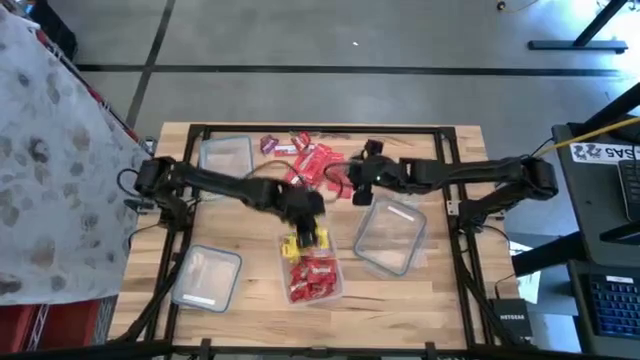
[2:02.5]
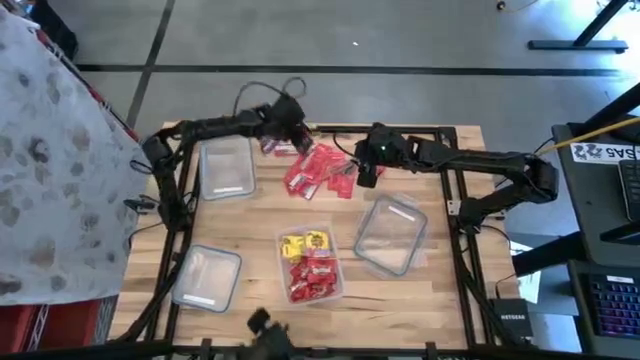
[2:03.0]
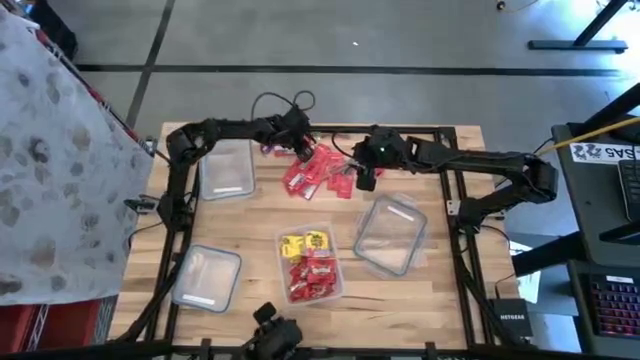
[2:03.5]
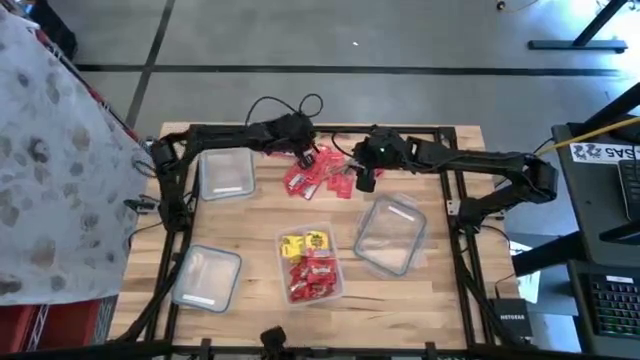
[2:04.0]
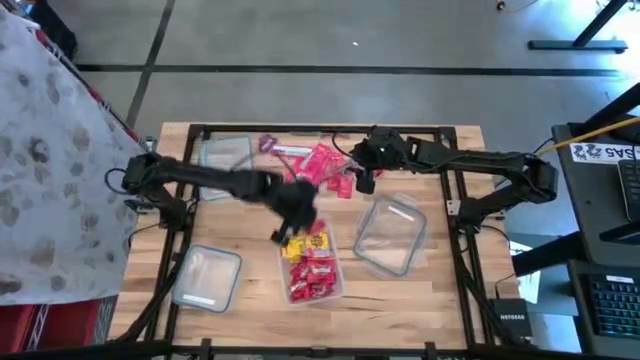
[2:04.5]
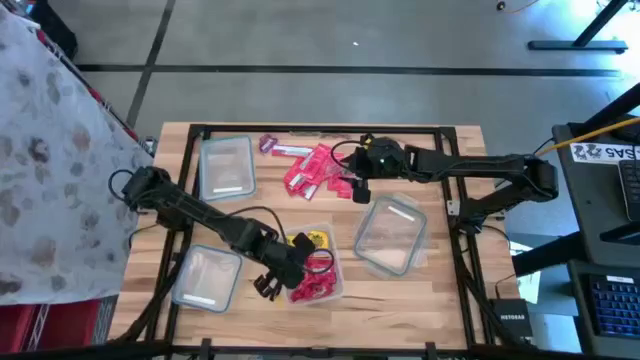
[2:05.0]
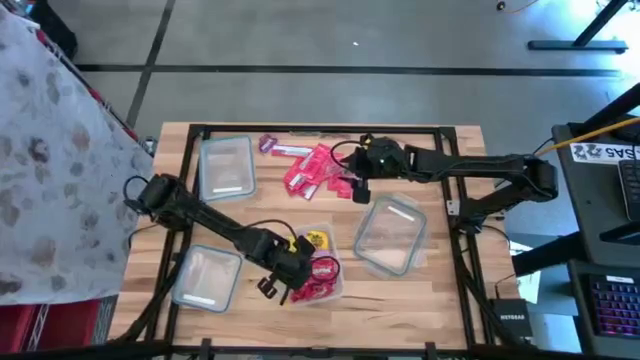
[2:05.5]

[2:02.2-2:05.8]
Task: Sort candy
Put the red candy into the right transparent bin

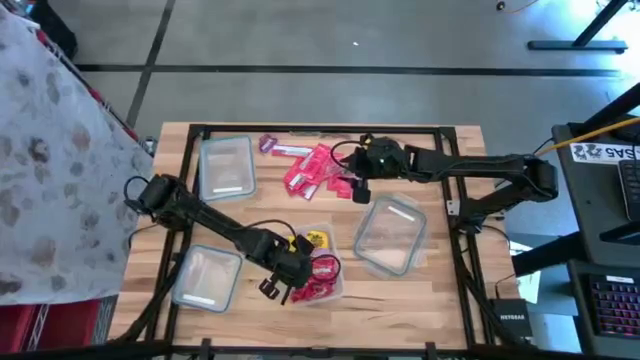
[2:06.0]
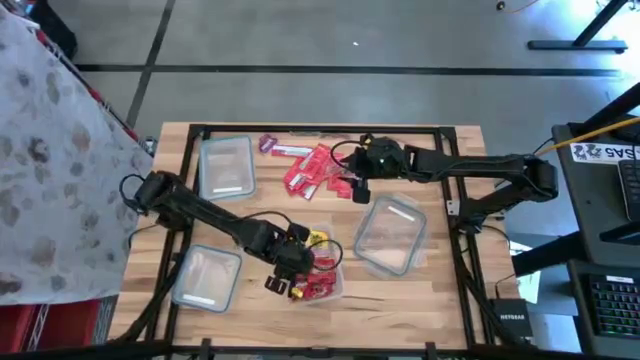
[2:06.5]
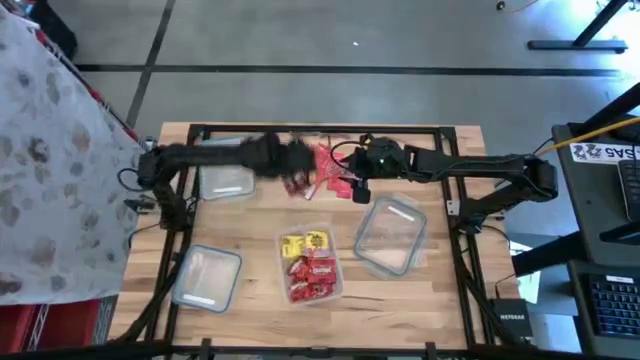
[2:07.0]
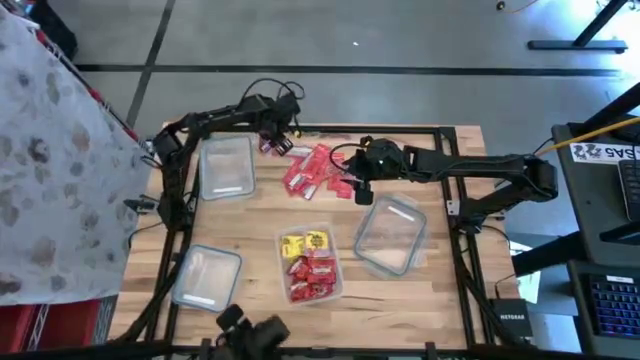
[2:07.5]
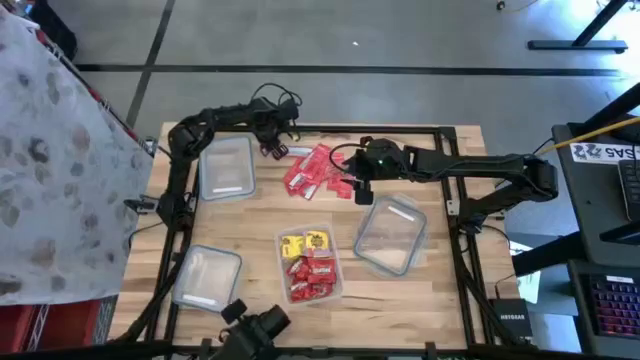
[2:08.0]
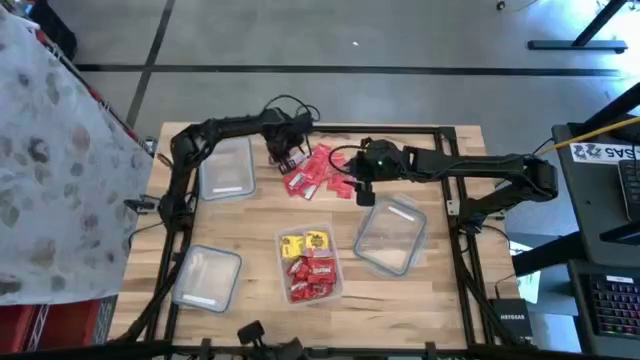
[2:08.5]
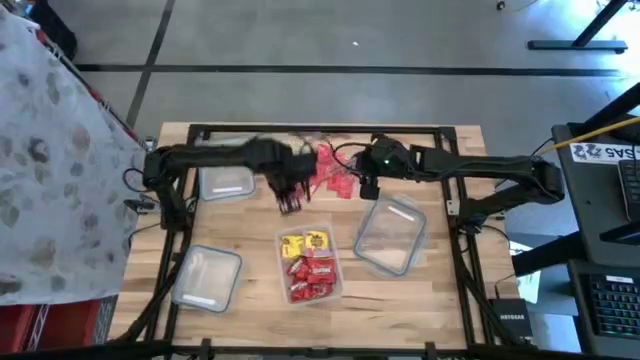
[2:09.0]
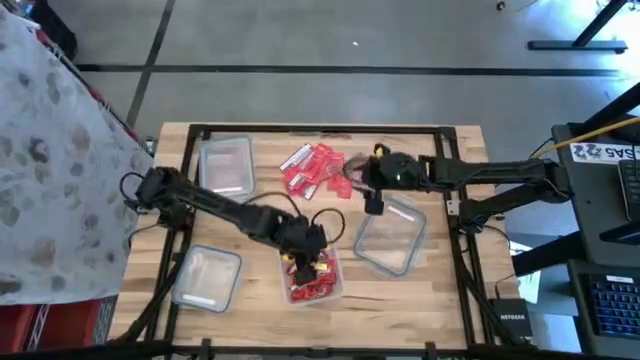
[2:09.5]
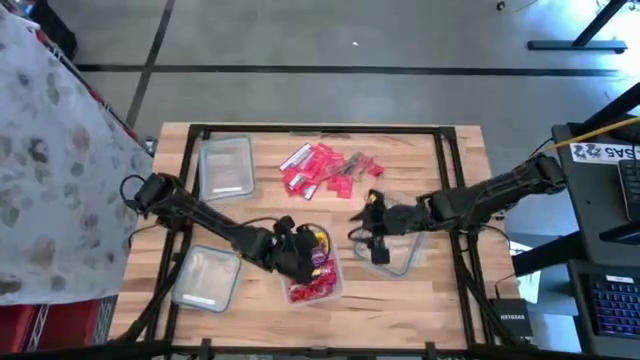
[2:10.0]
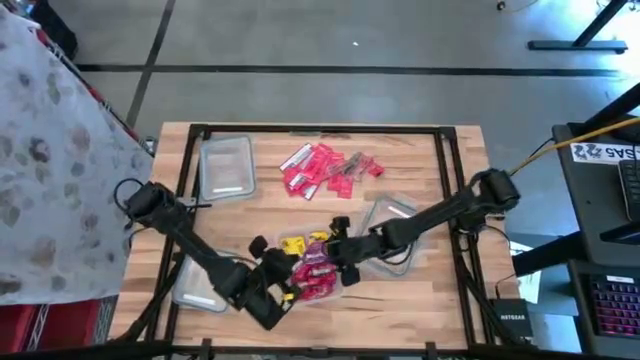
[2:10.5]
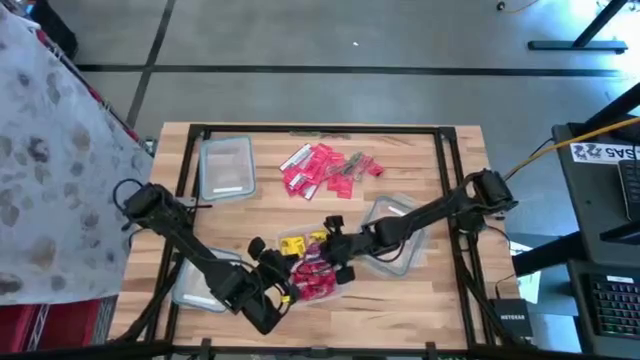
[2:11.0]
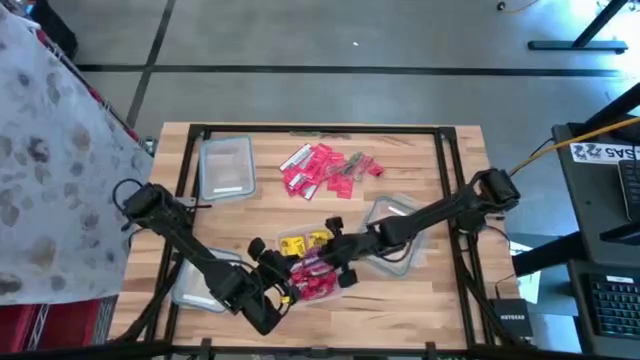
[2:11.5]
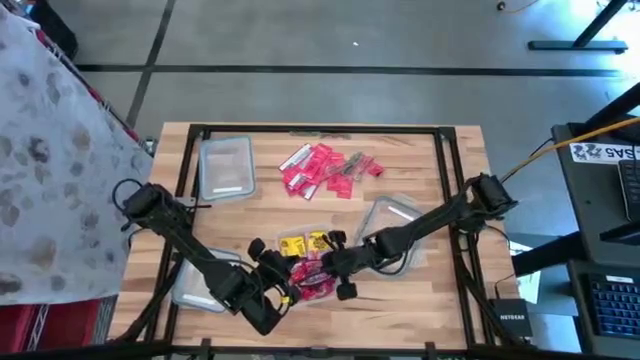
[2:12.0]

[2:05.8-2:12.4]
Put the violet candy into the right transparent bin

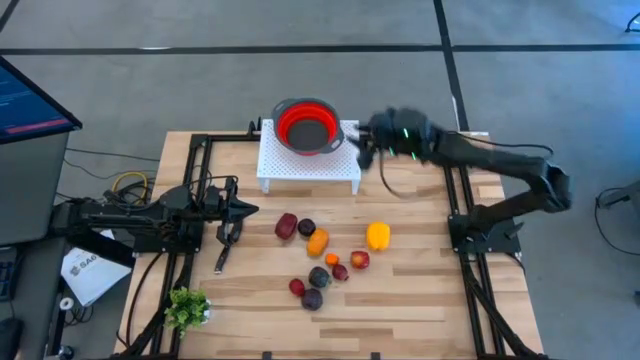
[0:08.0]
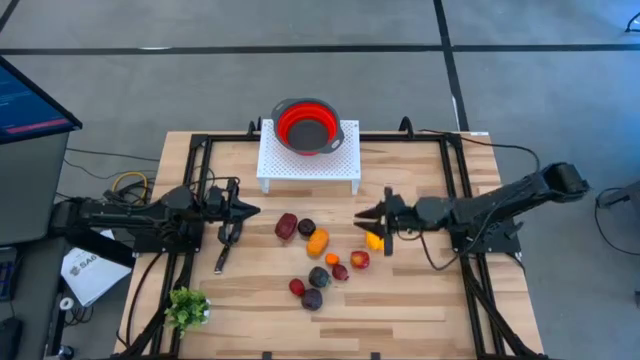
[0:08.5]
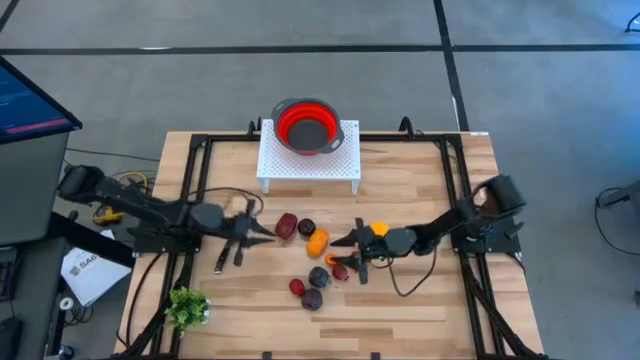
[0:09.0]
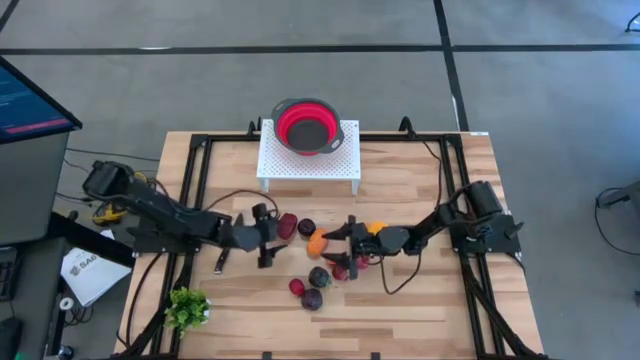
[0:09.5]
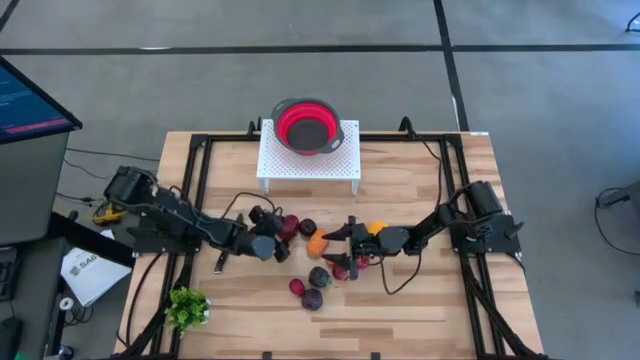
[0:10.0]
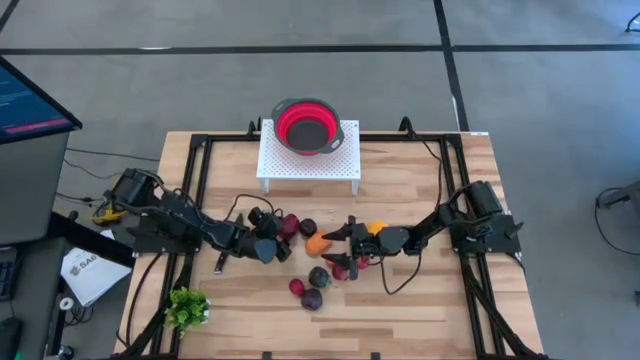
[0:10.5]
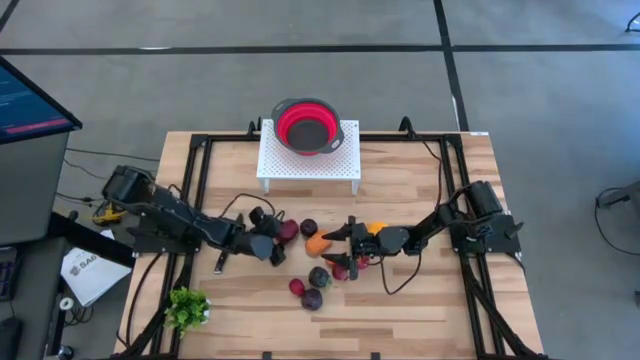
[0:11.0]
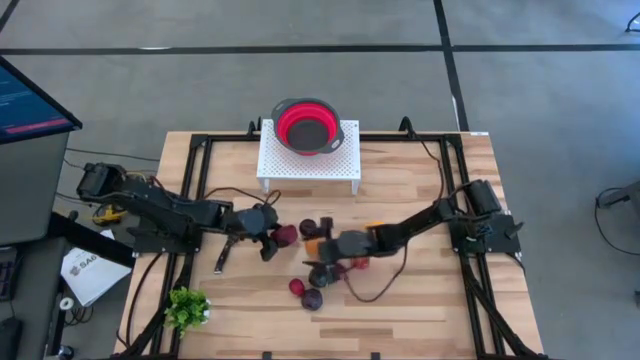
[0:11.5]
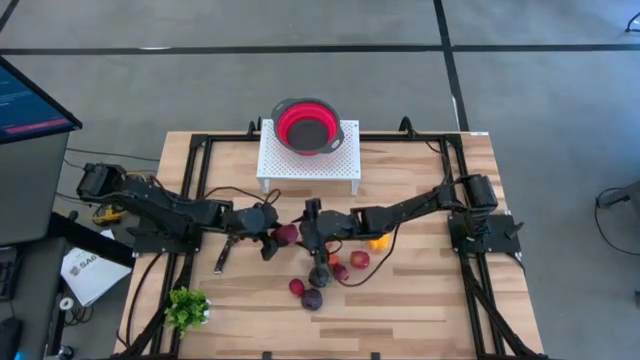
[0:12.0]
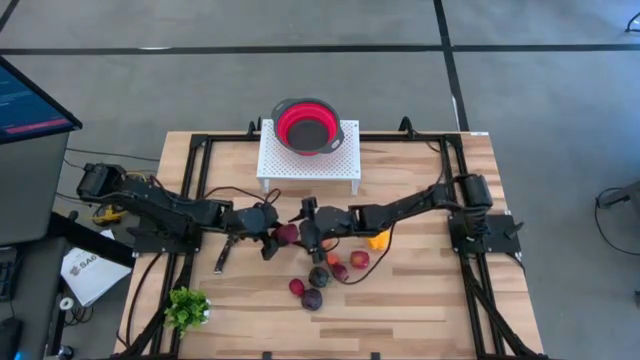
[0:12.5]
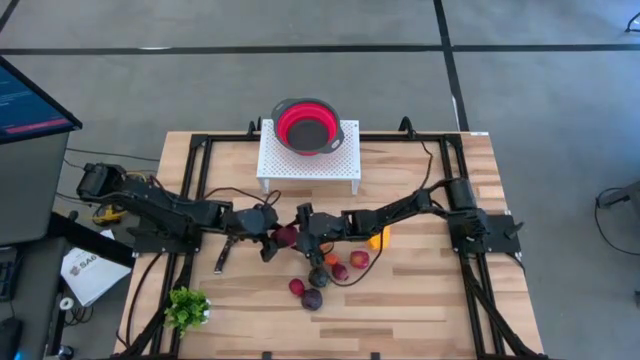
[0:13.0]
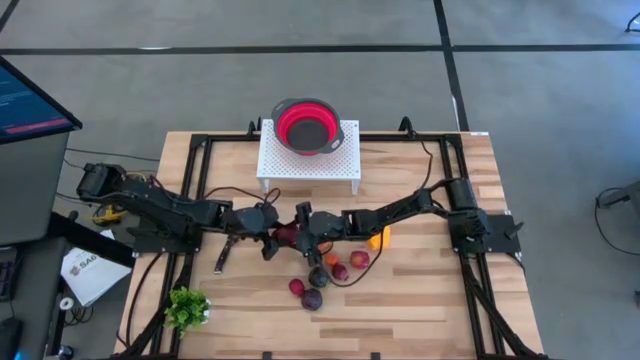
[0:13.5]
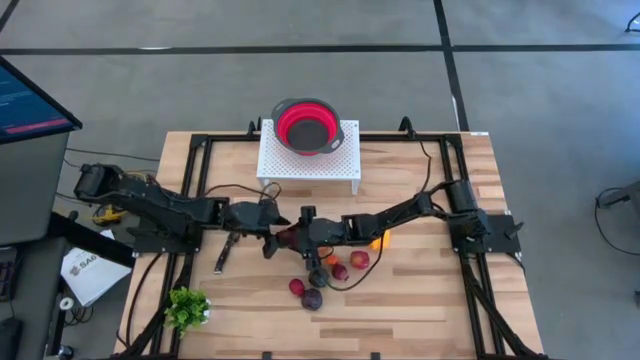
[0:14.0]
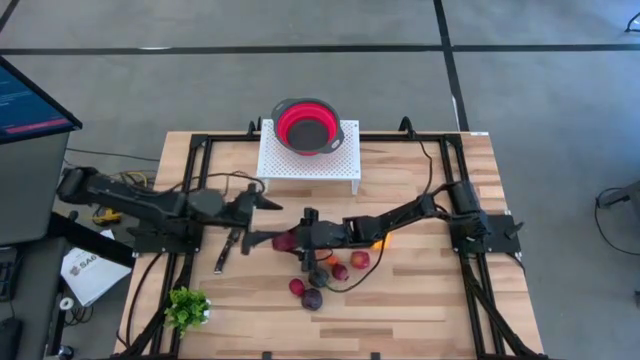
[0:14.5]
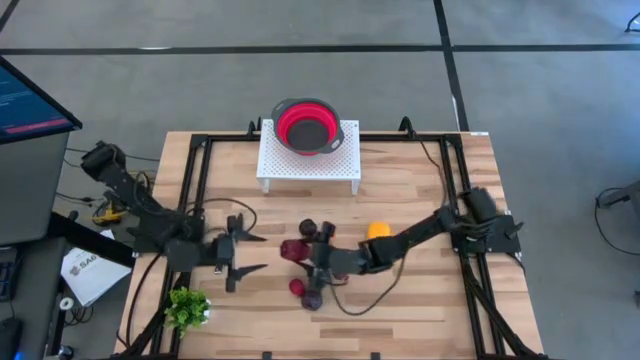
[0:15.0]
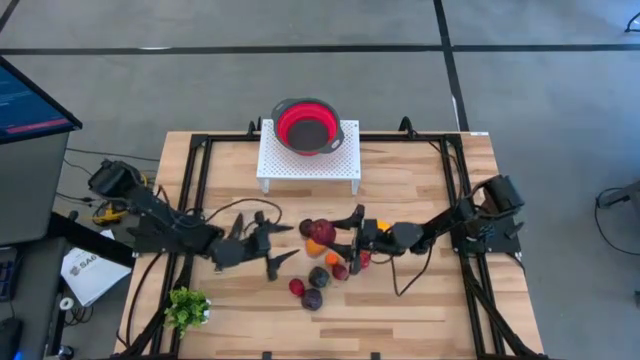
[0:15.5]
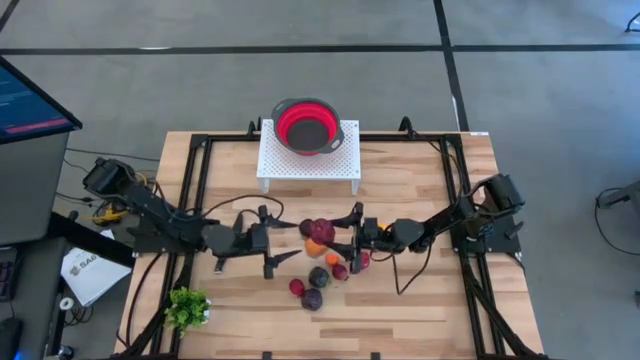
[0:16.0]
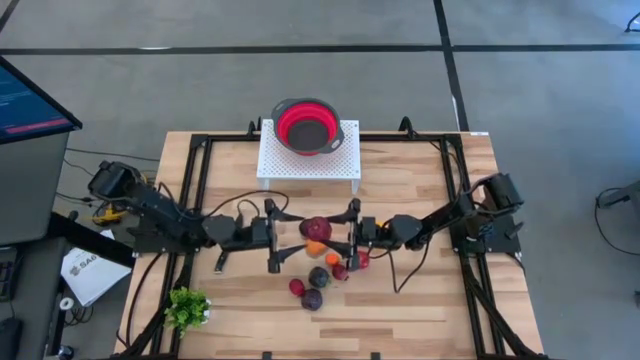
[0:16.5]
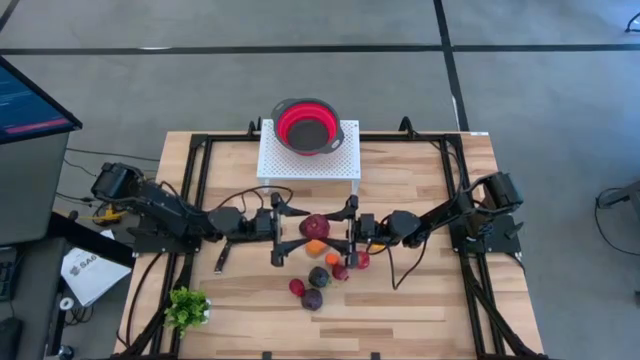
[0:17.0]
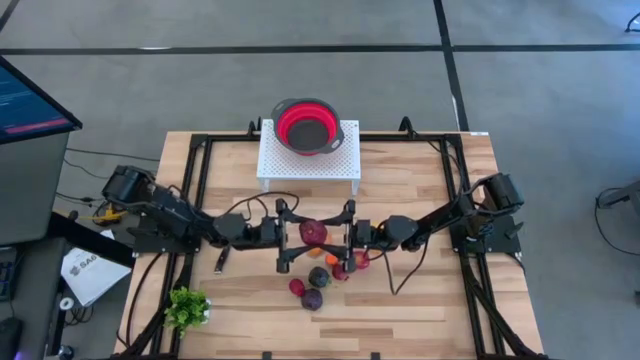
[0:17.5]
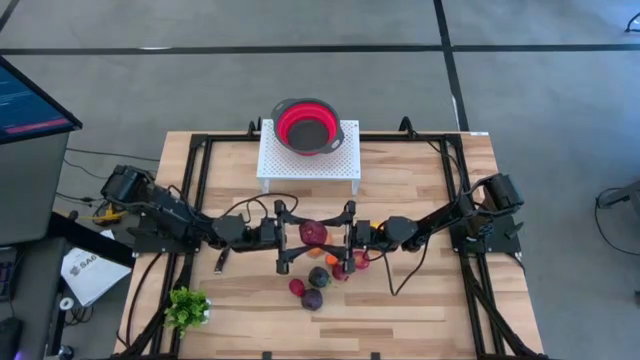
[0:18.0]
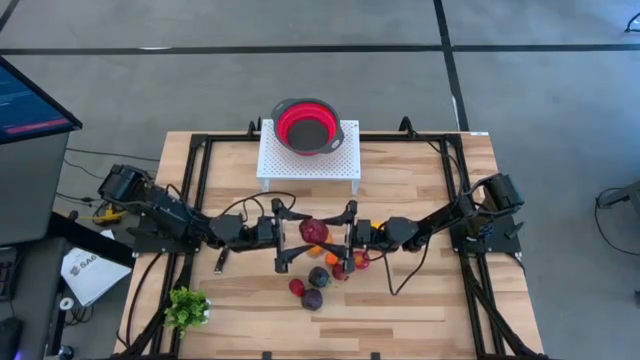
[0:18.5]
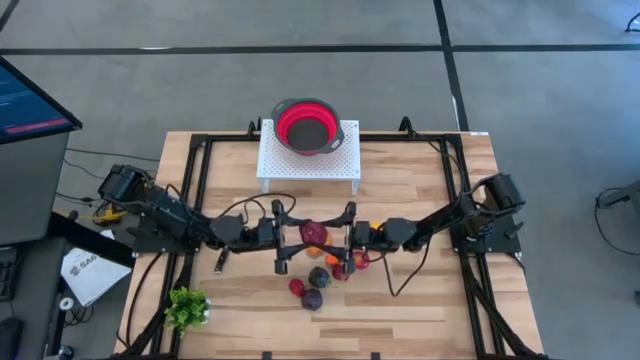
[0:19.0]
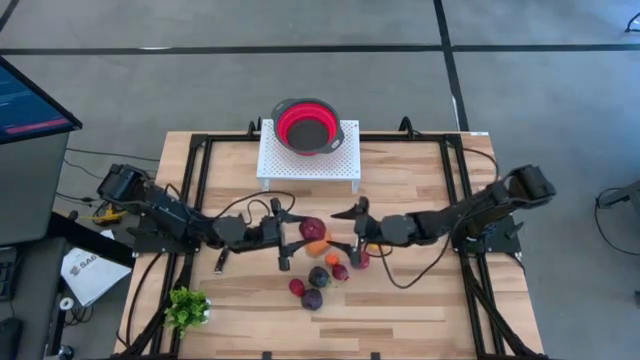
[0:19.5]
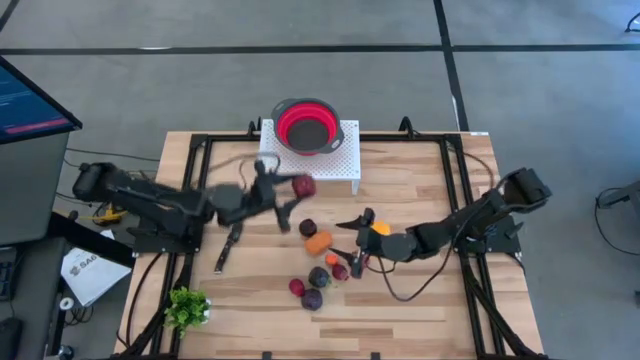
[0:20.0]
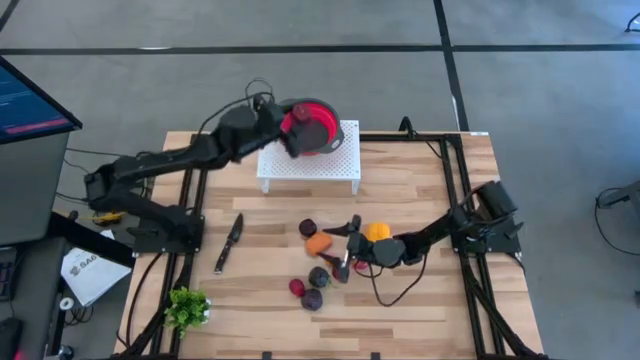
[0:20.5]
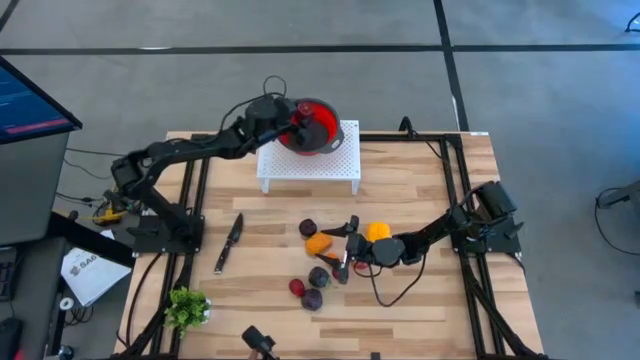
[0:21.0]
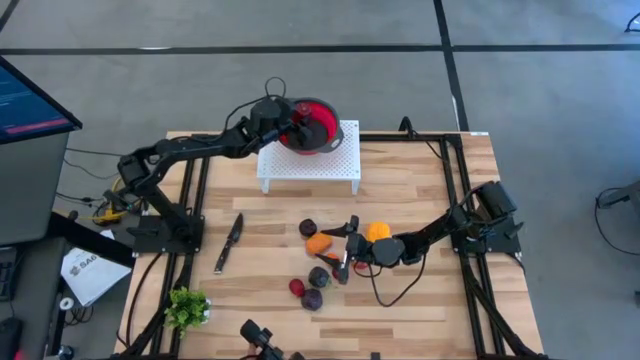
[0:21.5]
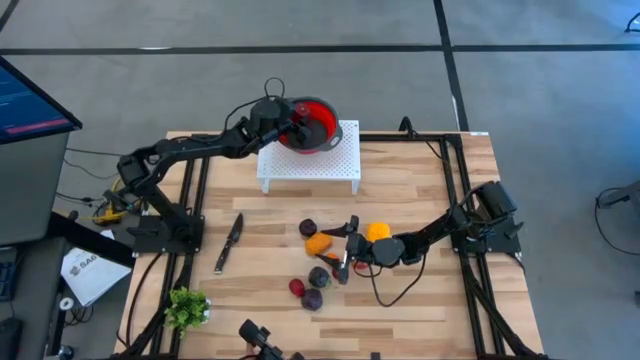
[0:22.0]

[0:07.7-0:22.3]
Task: Pick & Place Fruit
Put the left red apple into the red strainer bowl on the shelf
